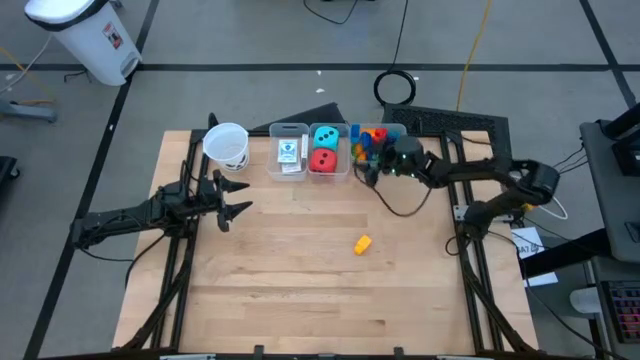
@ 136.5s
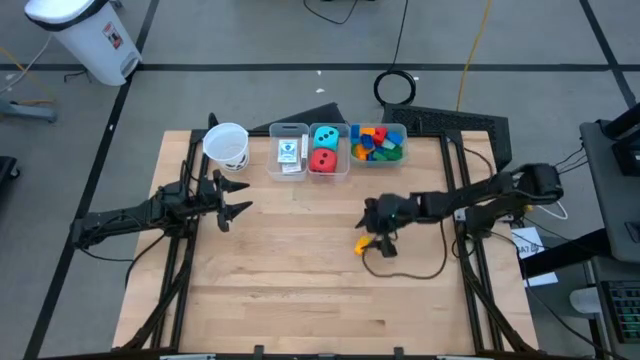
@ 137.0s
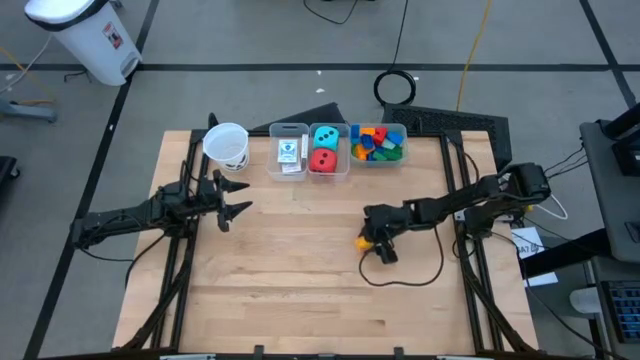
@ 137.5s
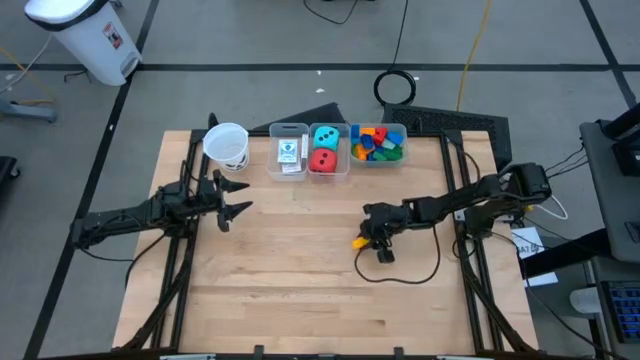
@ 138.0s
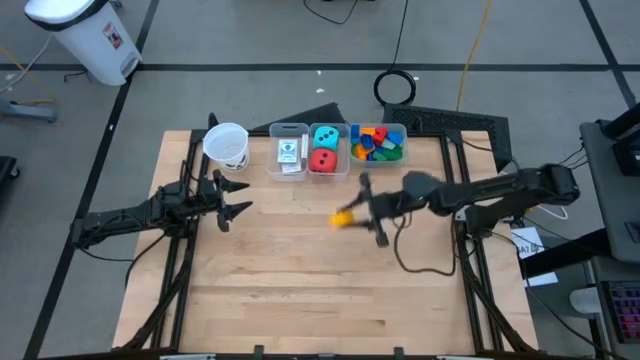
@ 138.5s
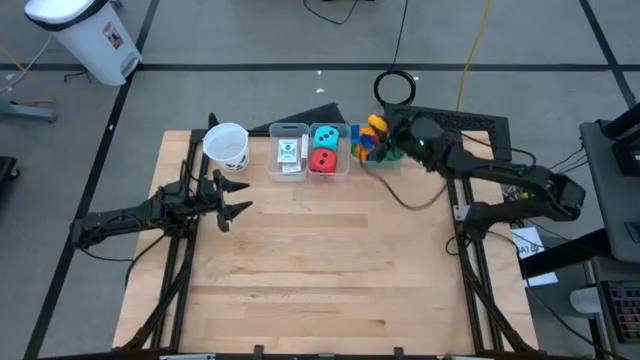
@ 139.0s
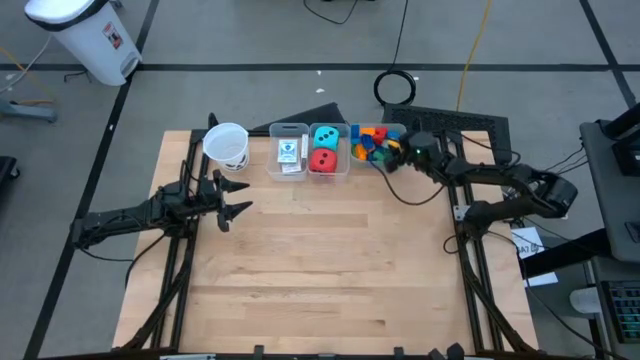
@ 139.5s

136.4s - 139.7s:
Task: Pick & Place Toys
Put the yellow game piece into the right transparent bin

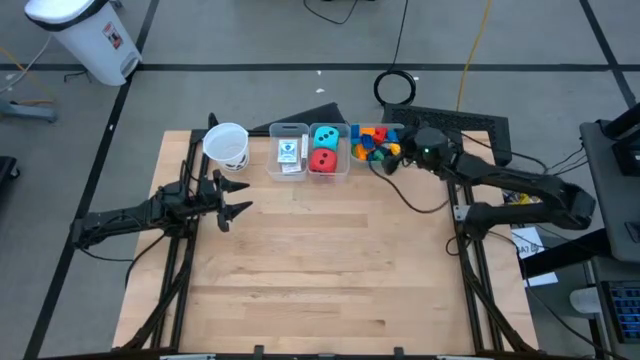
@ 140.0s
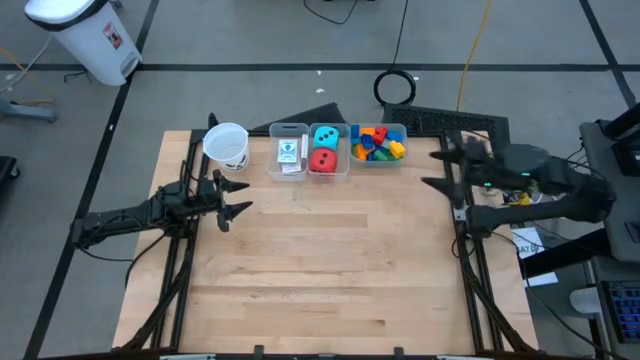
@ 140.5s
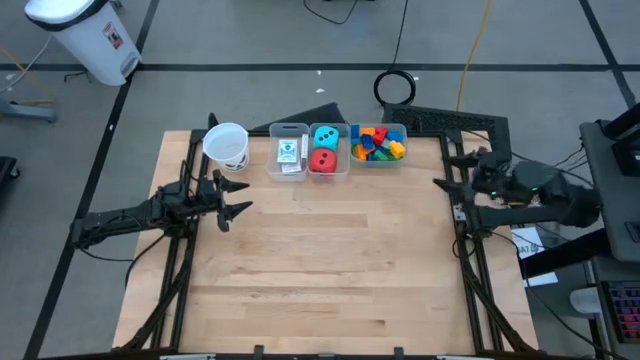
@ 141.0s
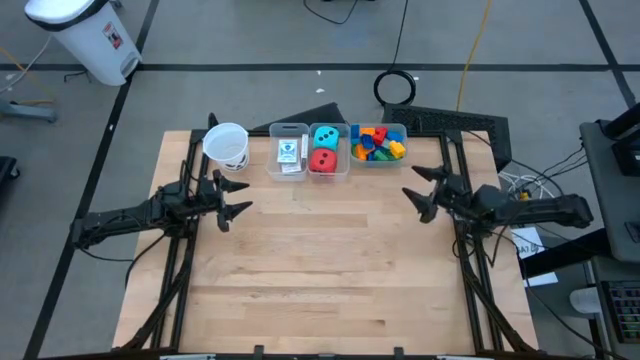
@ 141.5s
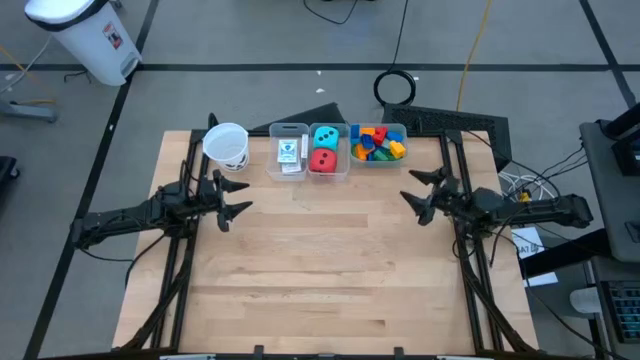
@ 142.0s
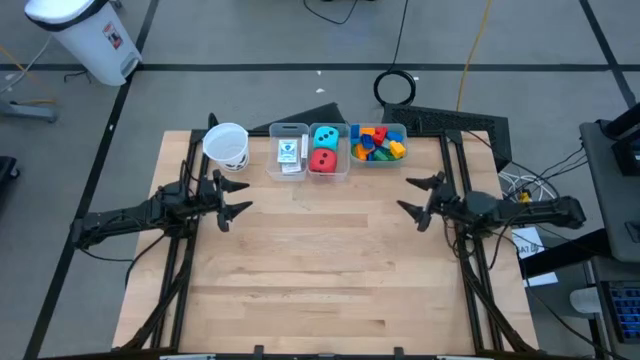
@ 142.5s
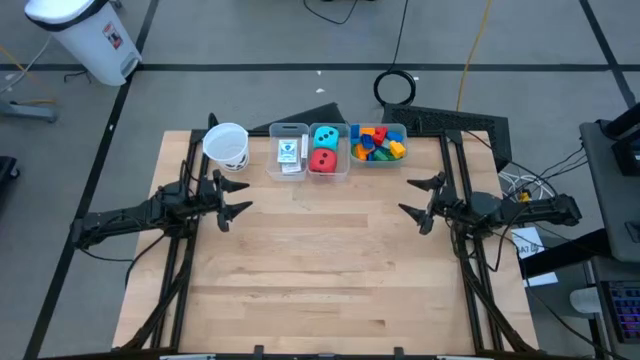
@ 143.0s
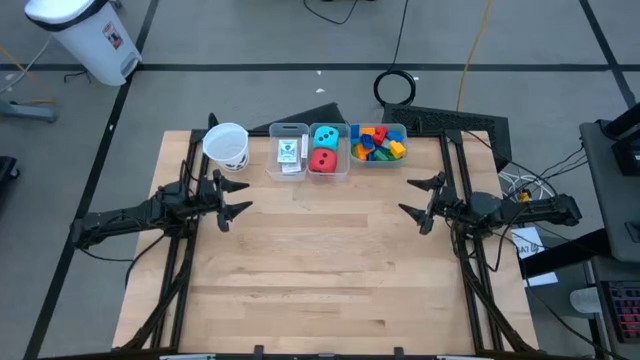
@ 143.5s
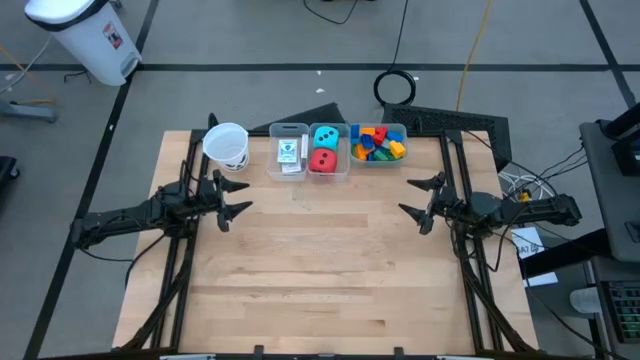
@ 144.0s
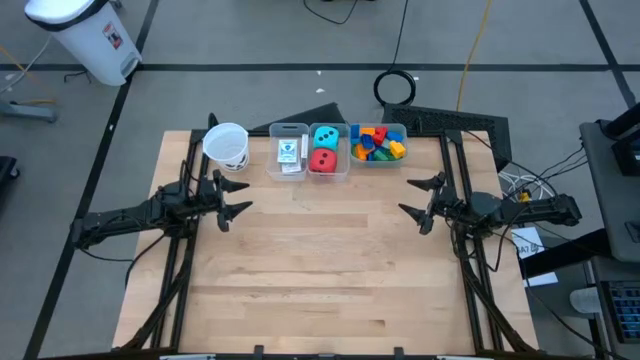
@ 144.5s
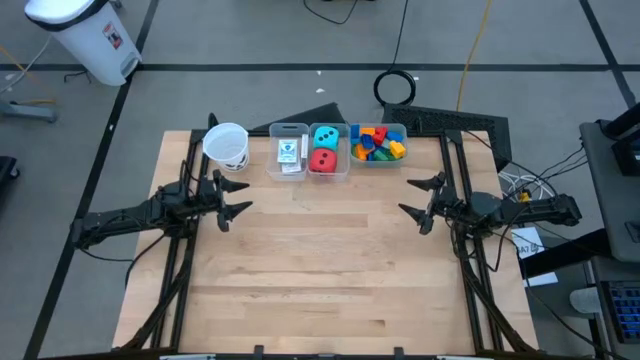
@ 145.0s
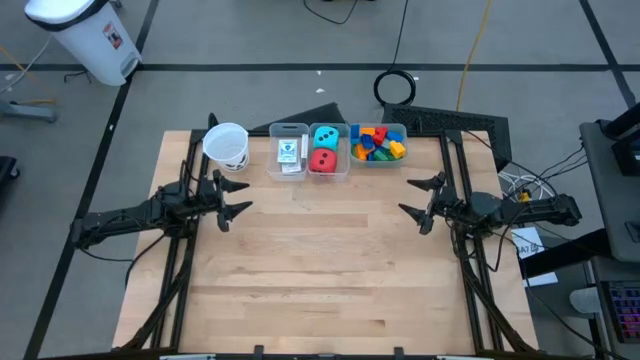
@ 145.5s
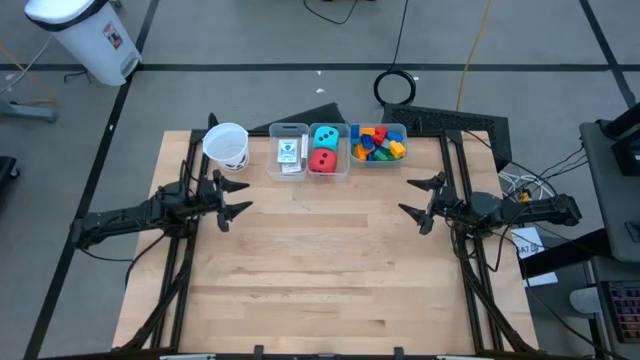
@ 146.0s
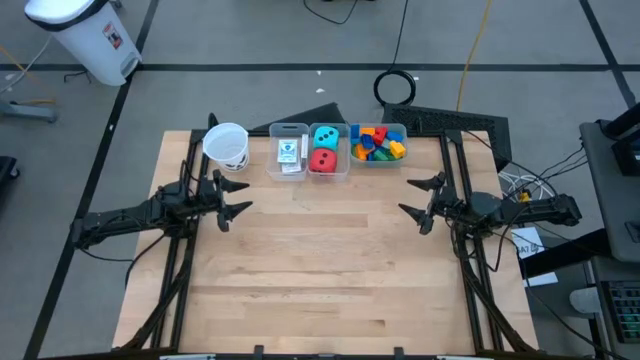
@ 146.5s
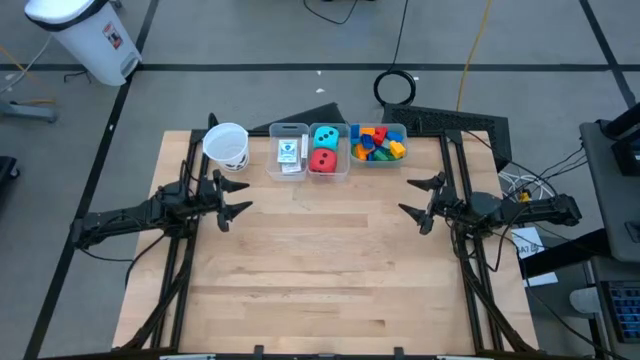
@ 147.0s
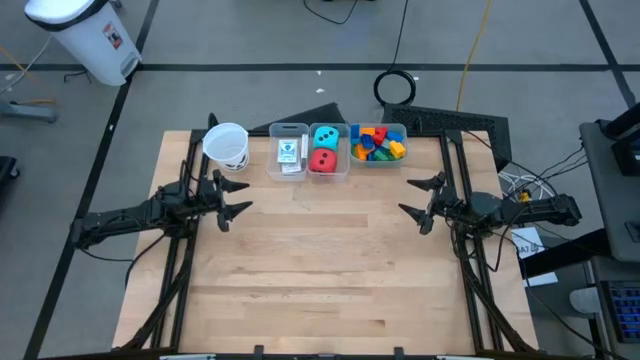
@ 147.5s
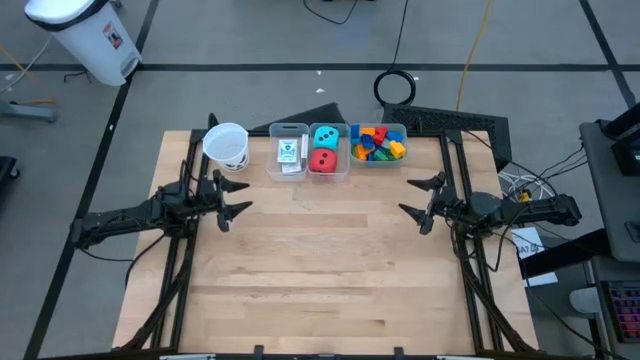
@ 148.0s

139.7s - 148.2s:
Return to Home Position

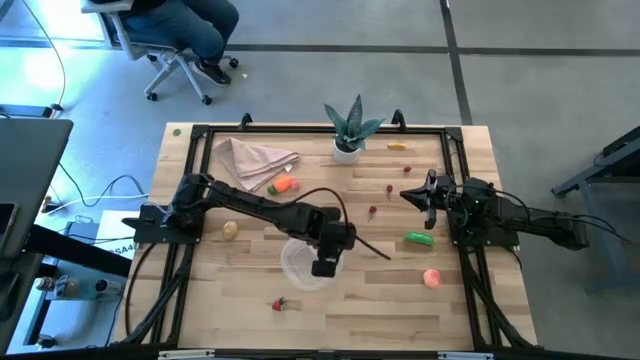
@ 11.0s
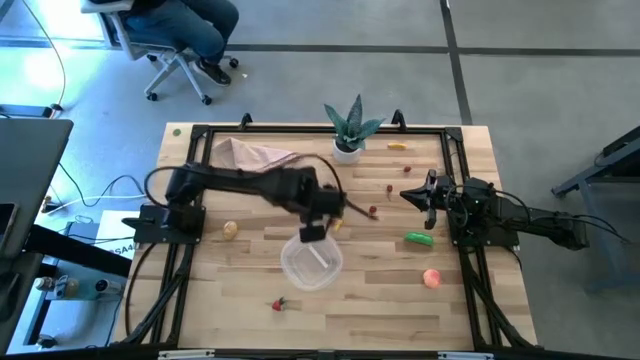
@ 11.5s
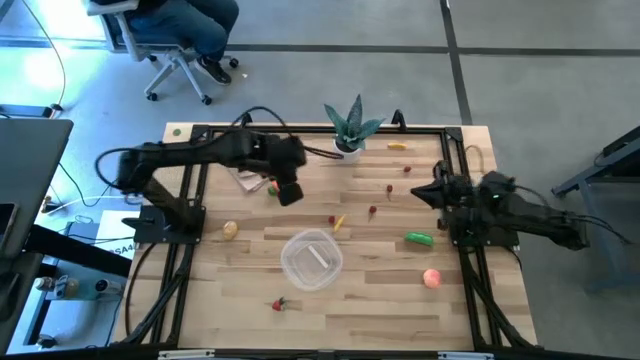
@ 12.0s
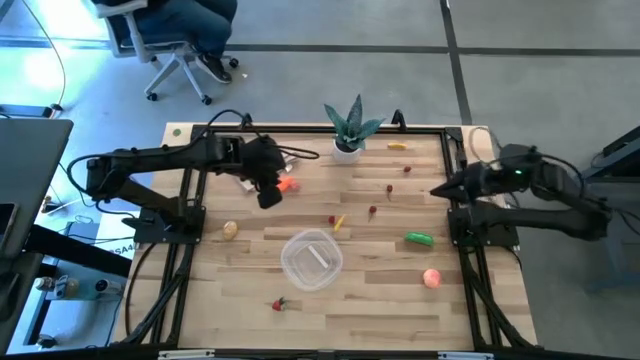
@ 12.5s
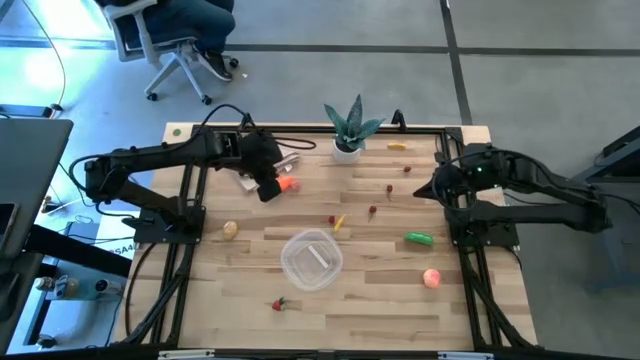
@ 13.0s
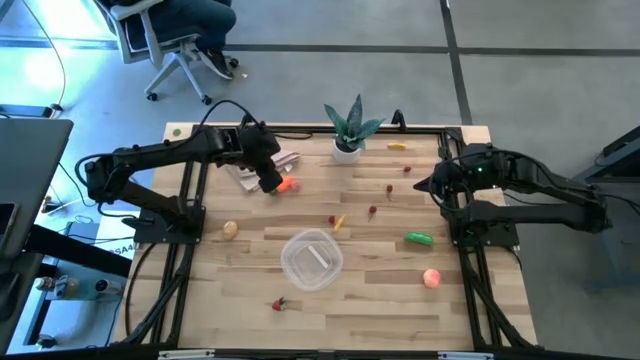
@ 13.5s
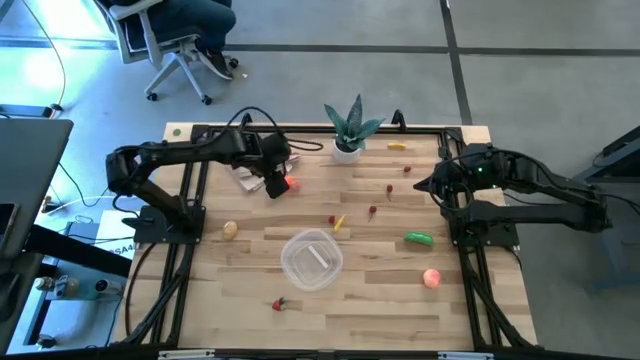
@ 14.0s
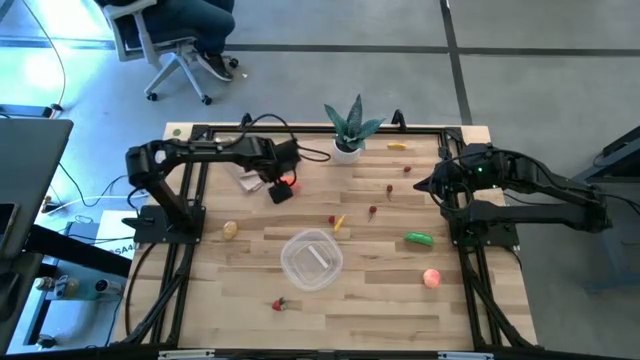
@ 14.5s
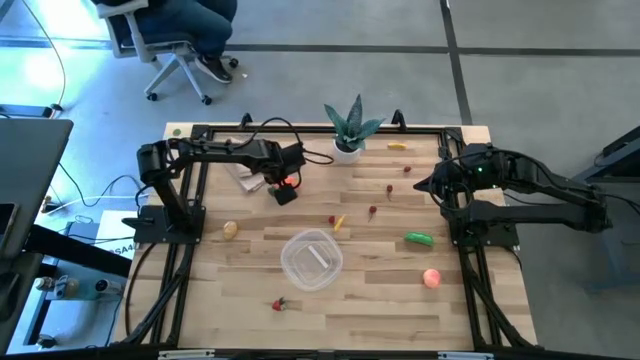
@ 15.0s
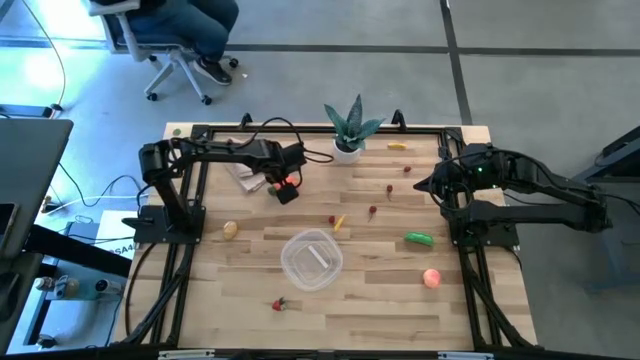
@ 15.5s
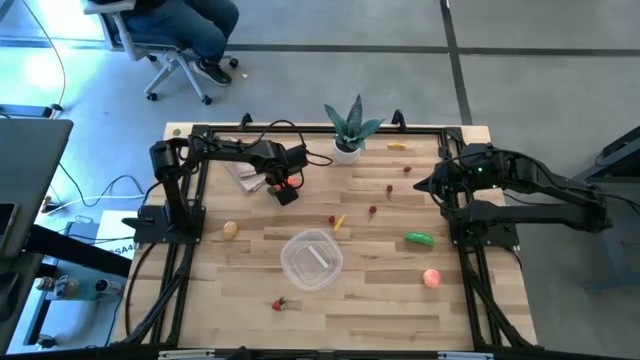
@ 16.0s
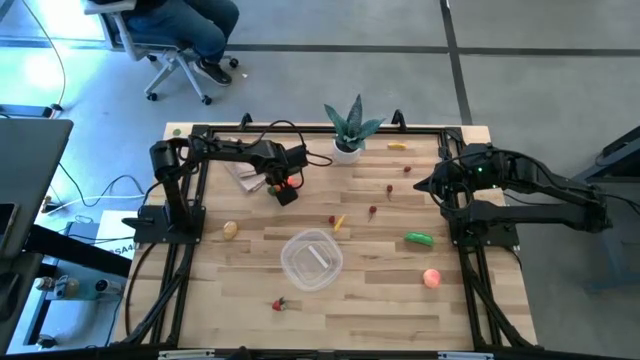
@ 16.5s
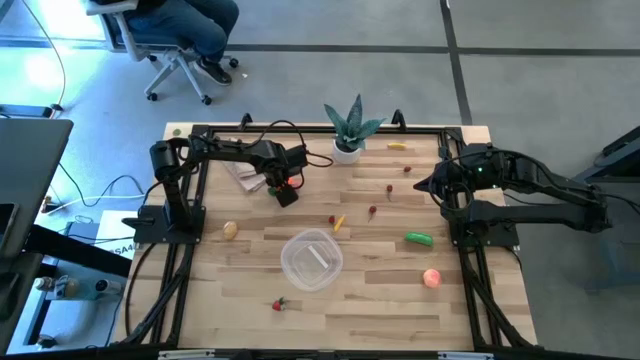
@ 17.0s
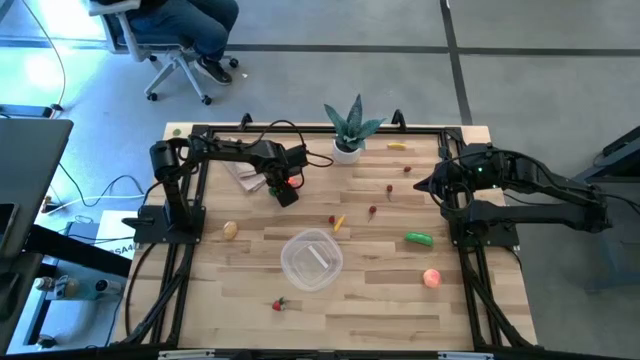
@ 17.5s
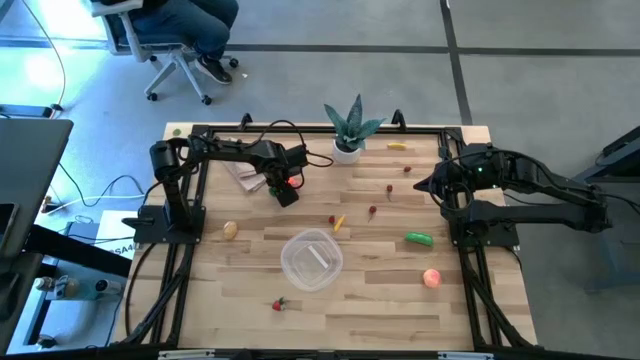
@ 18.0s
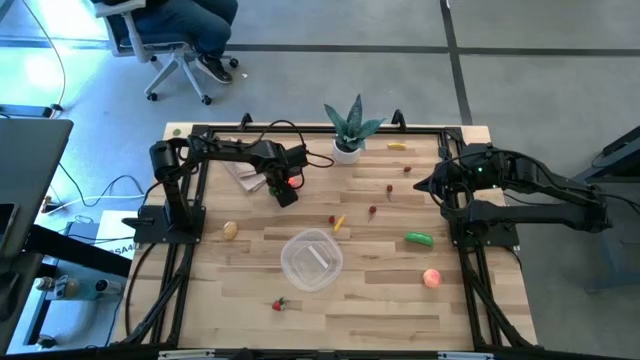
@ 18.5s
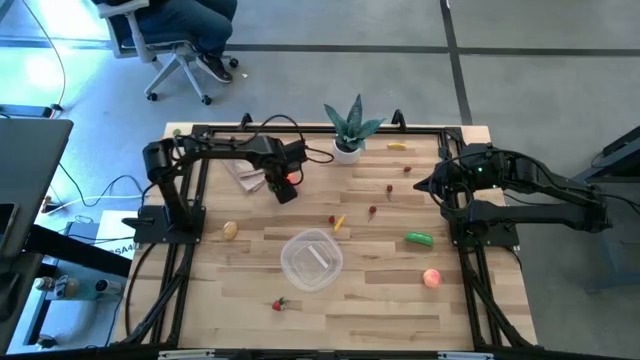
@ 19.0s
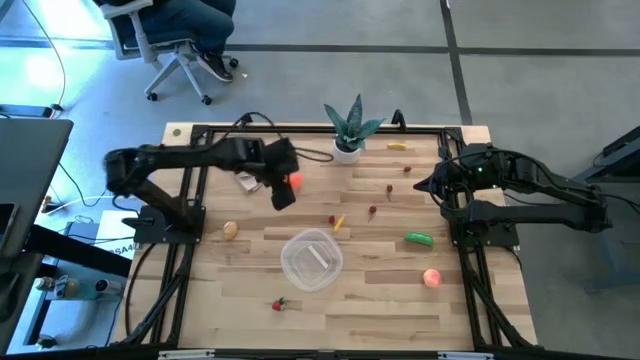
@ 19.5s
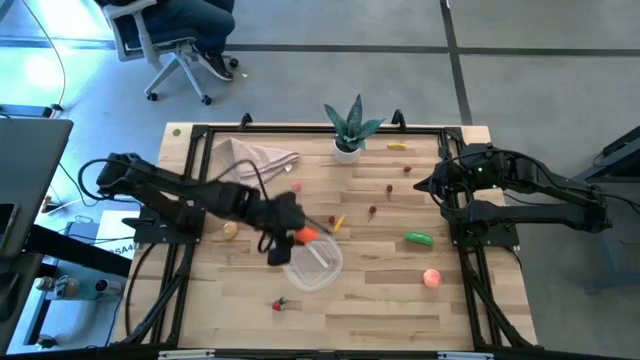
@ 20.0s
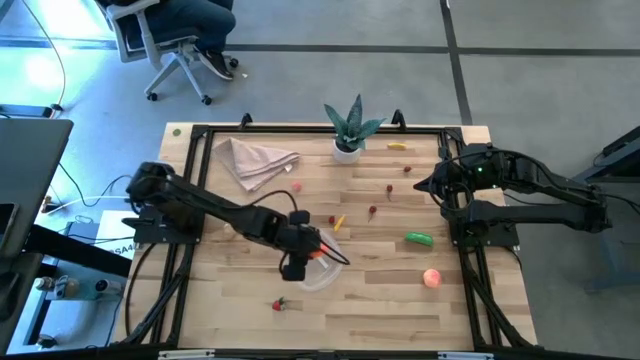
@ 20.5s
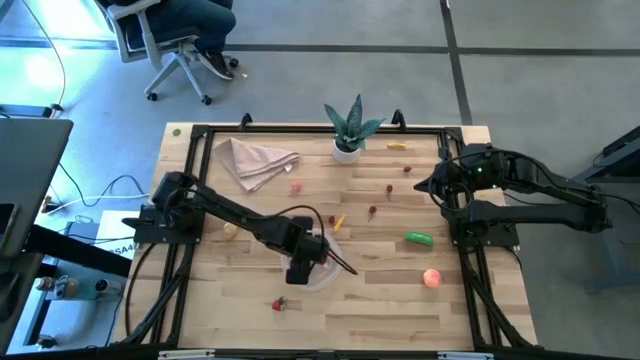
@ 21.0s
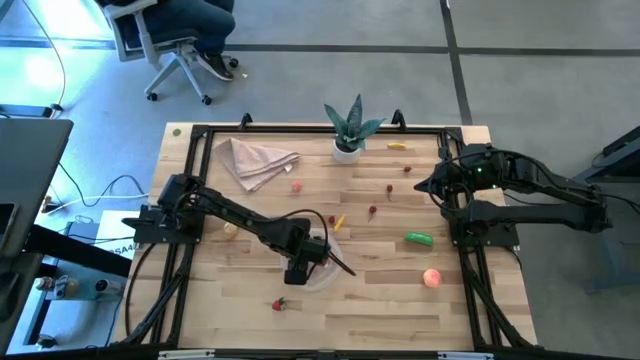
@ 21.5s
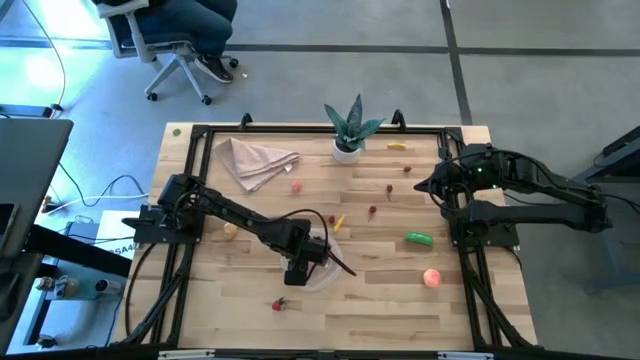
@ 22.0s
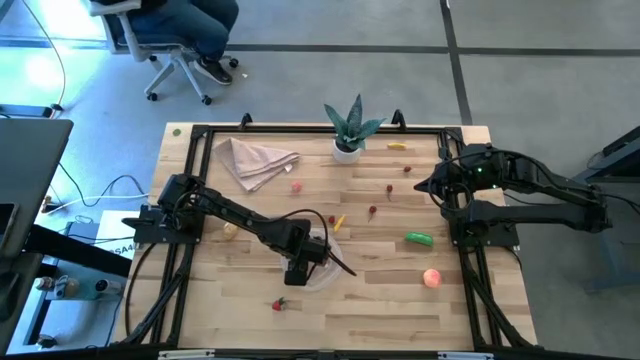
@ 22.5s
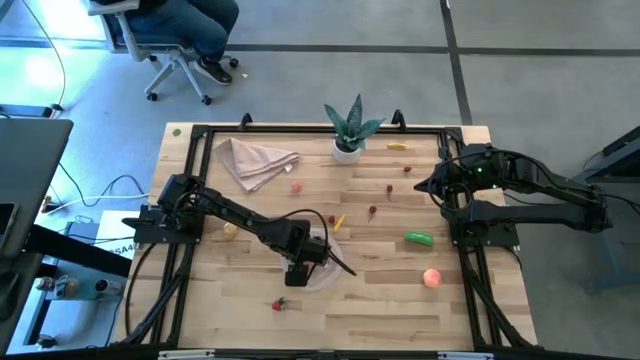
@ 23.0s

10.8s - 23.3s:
Task: Pick and placing Produce into tupperware
Put the carrot into the transparent container
